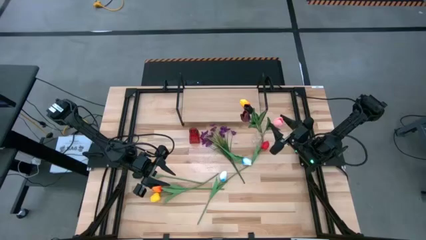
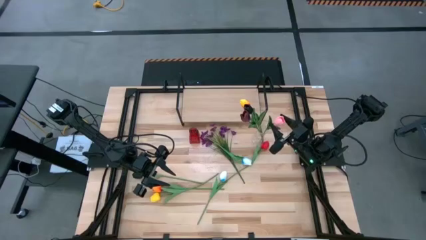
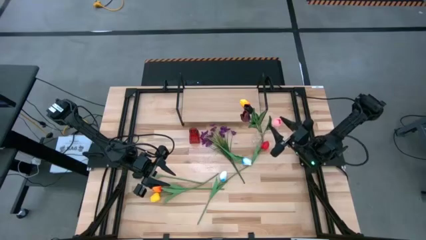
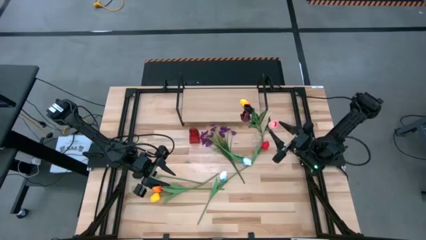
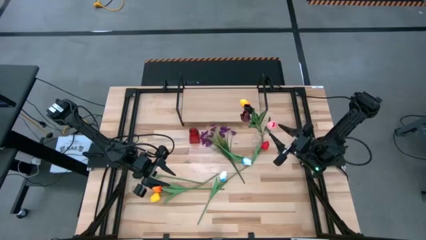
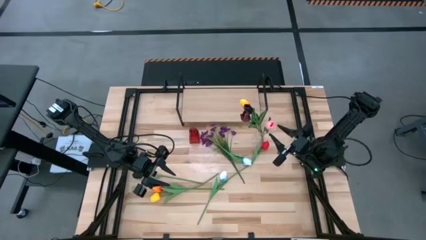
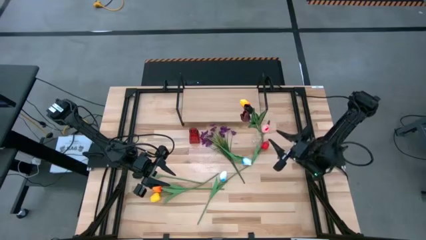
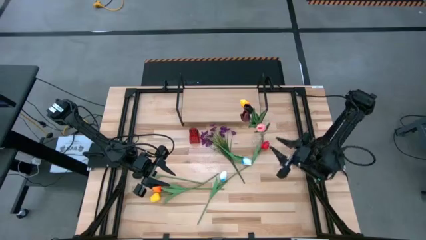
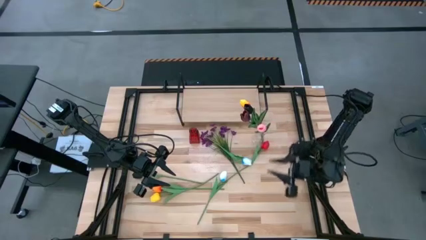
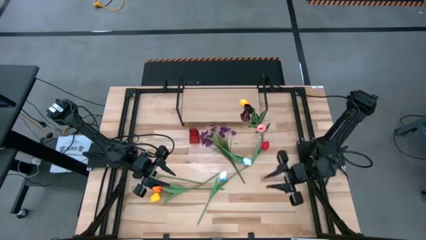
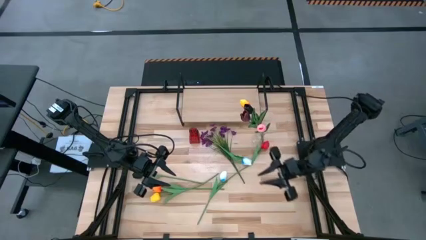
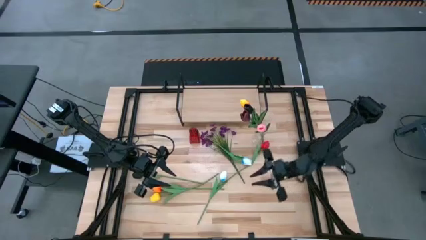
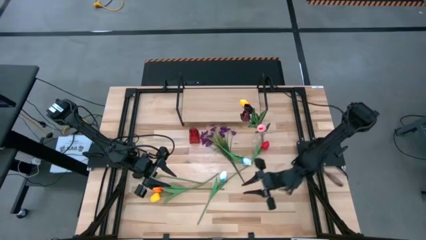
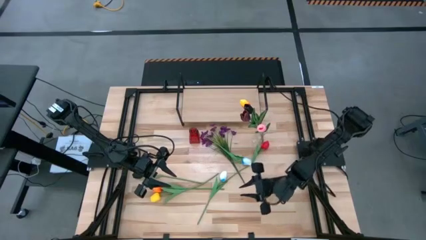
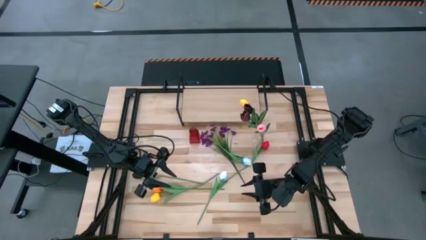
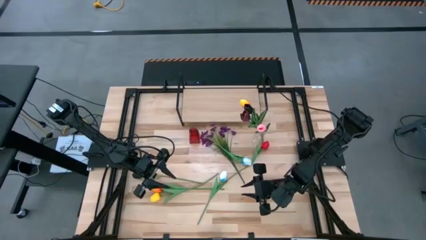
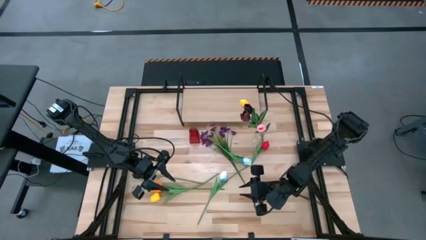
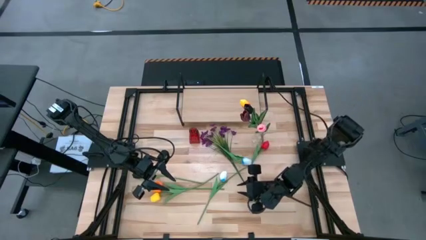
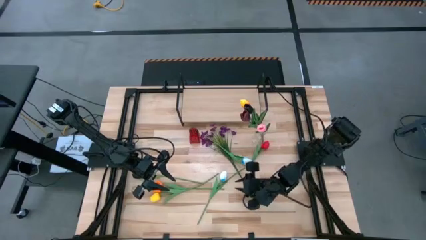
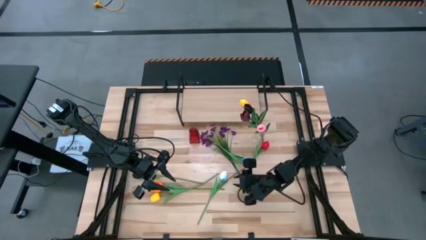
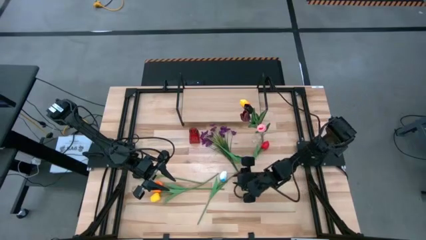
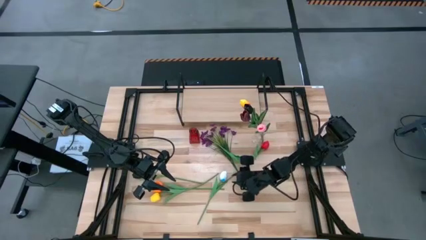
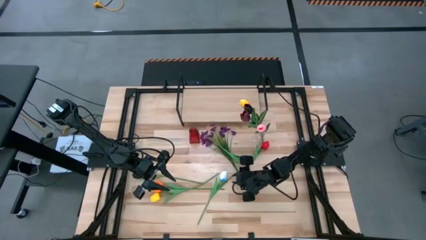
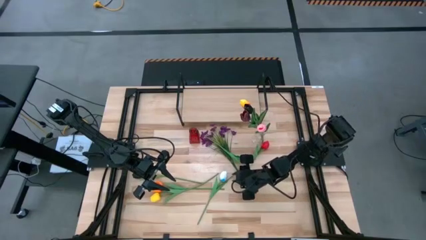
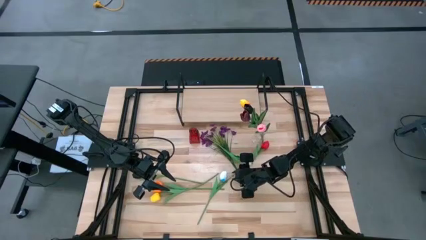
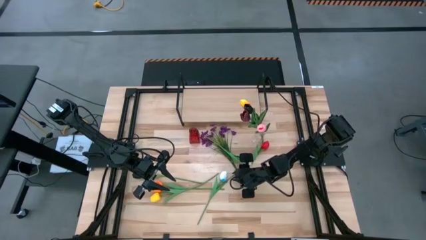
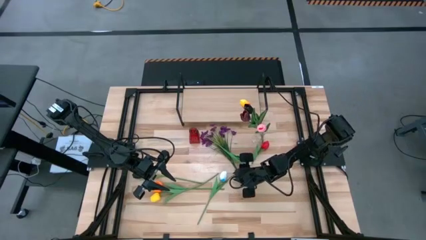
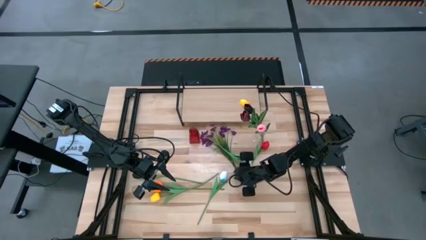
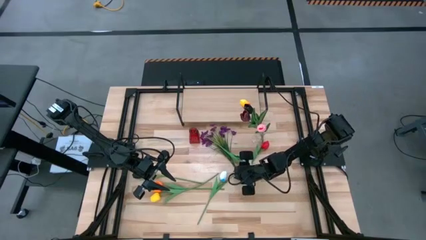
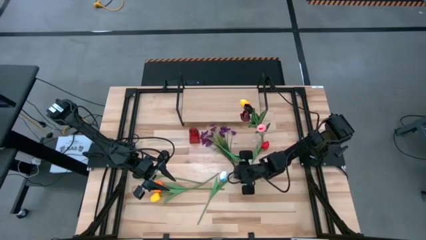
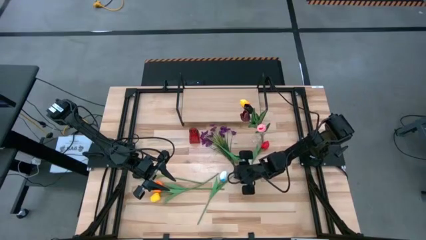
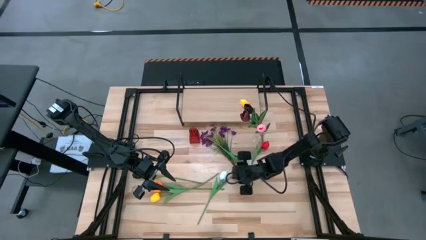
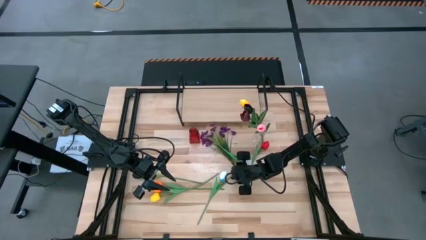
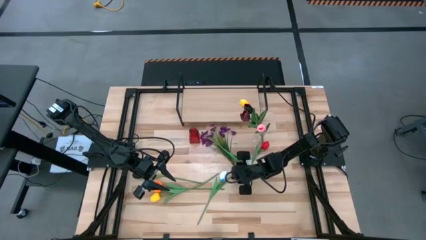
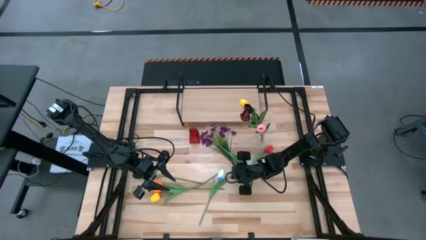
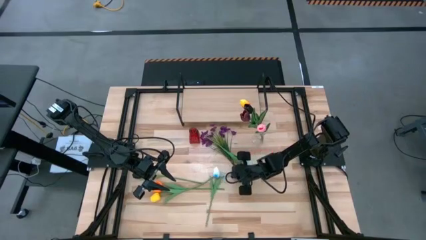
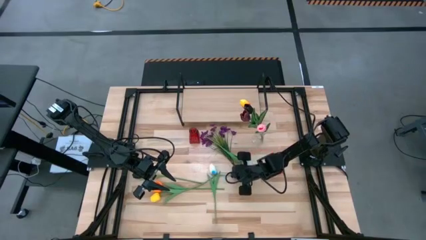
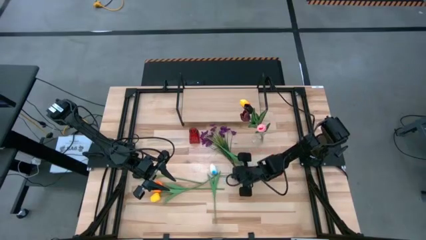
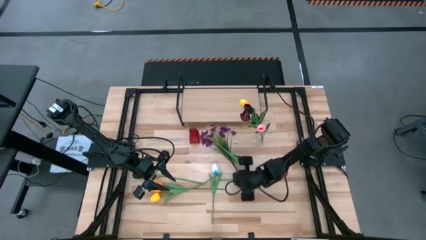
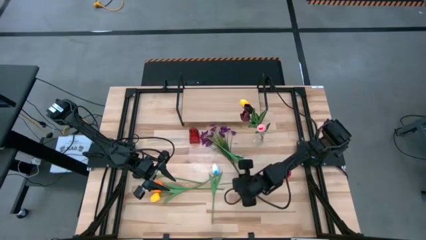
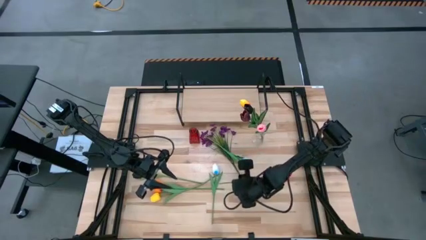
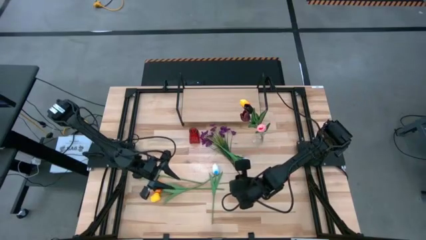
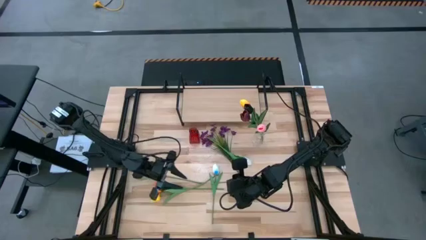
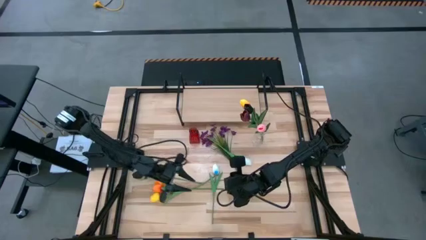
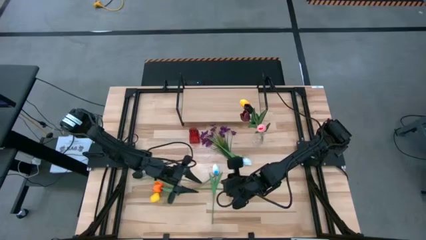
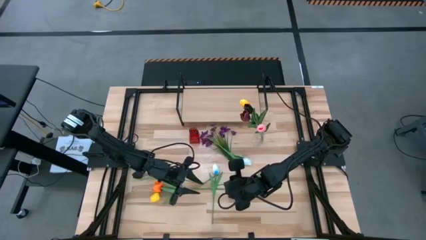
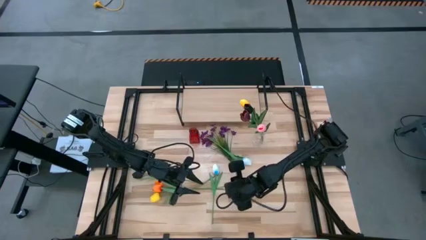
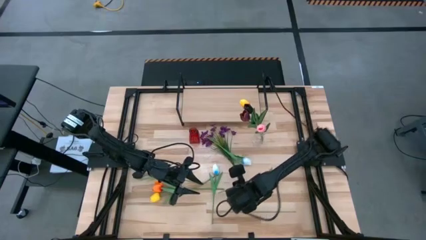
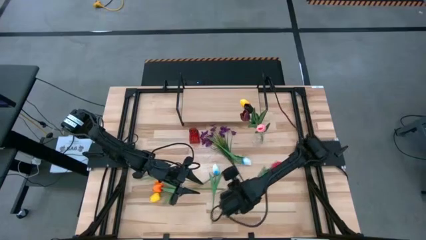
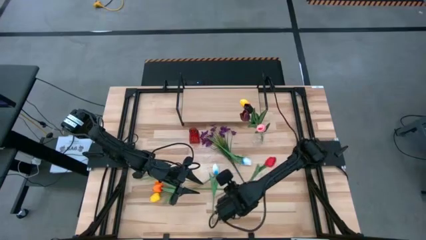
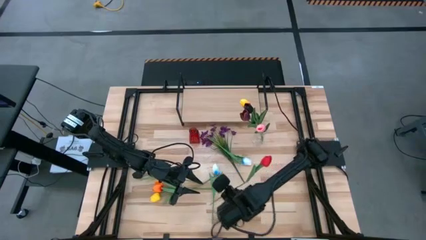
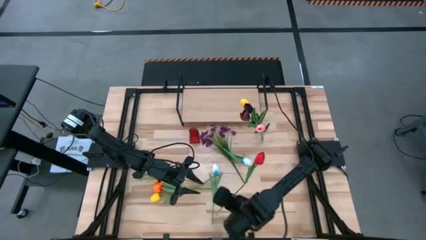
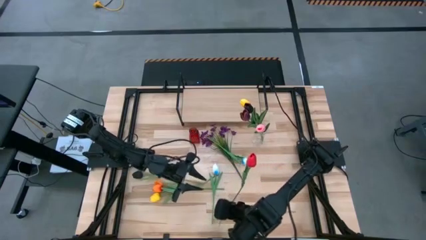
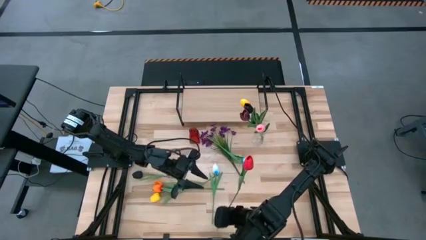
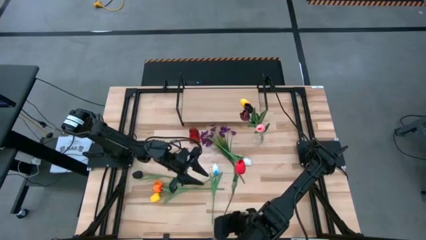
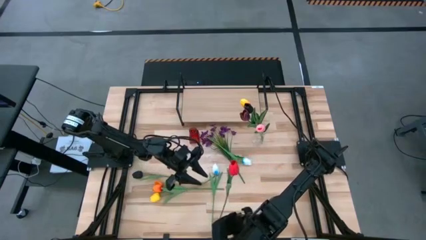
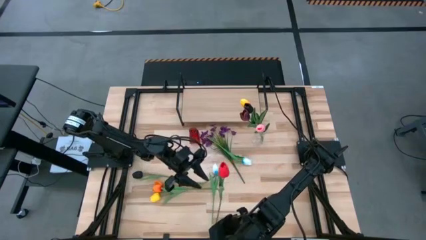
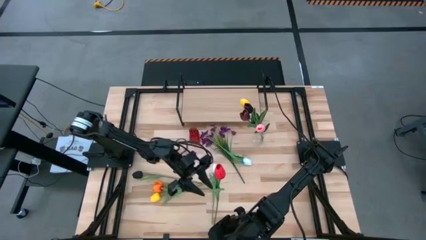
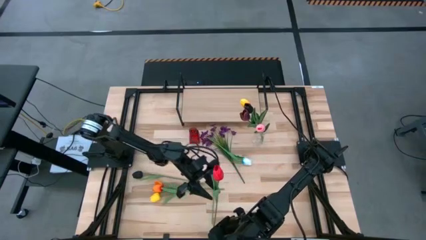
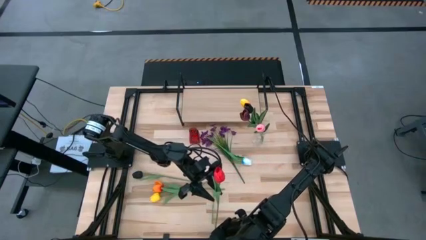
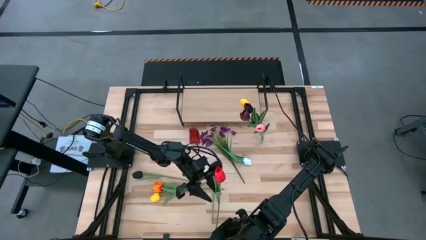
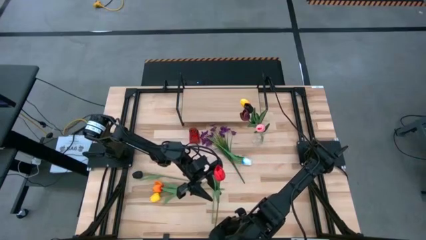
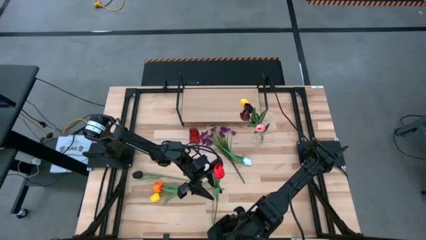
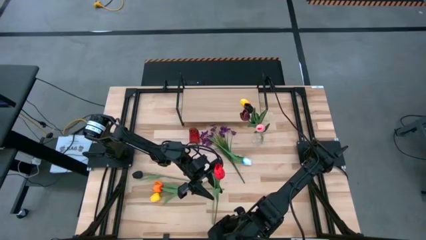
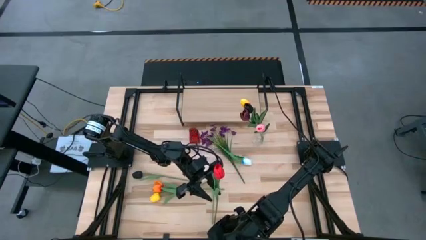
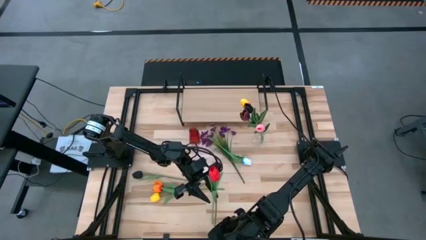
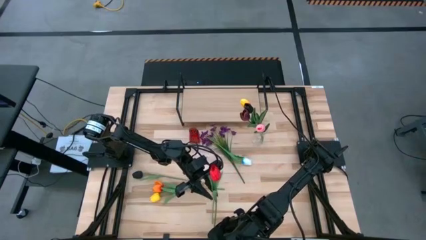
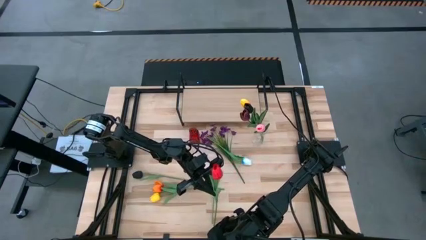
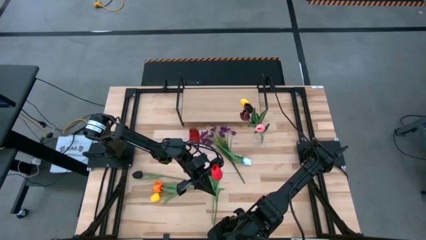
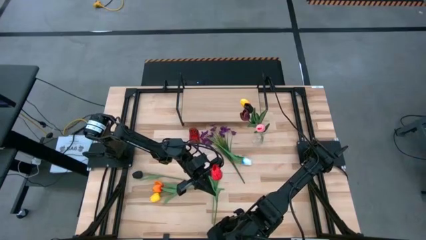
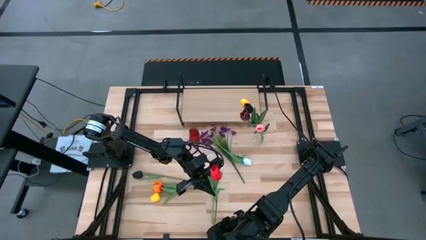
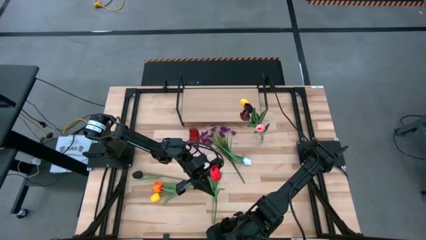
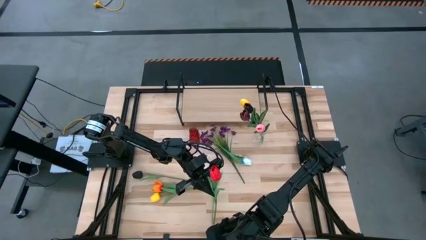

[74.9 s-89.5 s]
Task: Pick and place flowers into a vace then onto a shelf
Put the red flower into the transparent vase
